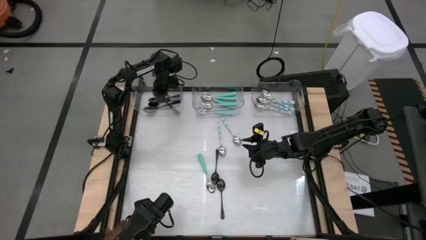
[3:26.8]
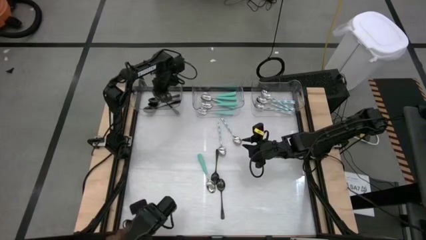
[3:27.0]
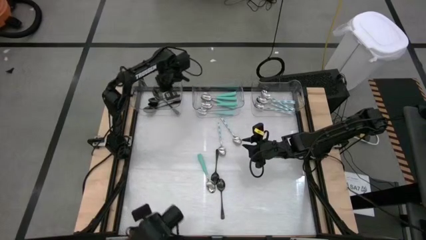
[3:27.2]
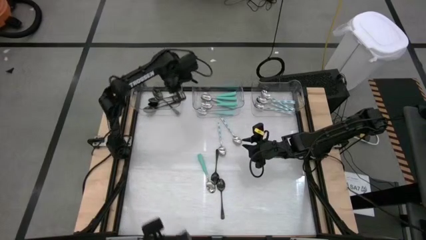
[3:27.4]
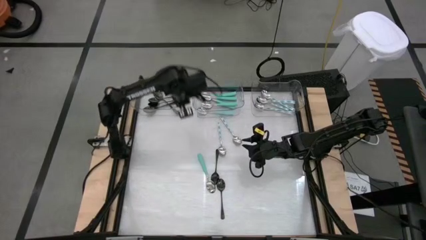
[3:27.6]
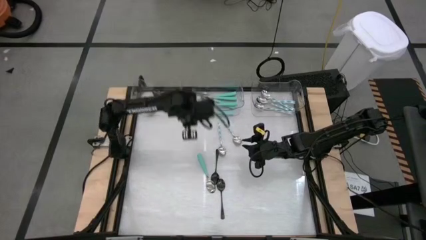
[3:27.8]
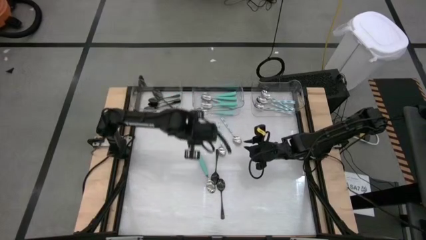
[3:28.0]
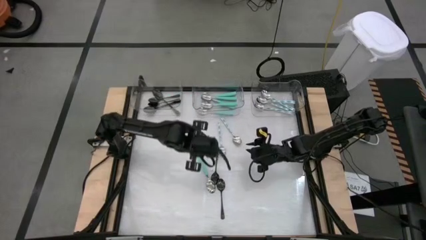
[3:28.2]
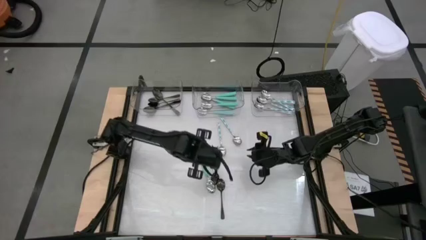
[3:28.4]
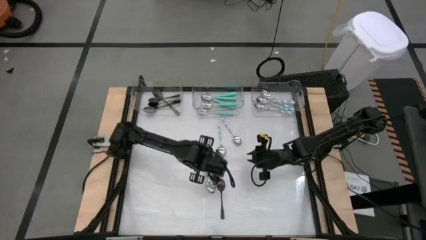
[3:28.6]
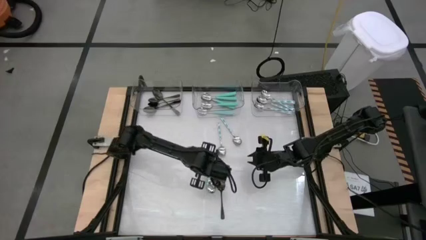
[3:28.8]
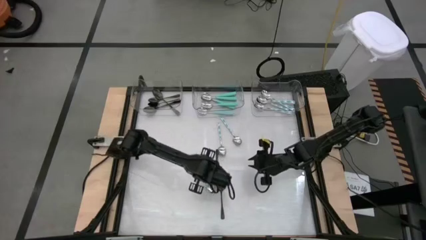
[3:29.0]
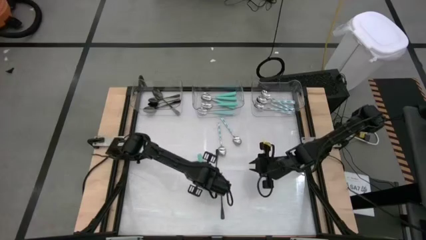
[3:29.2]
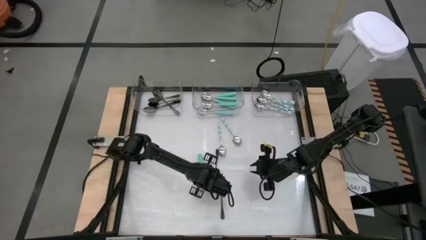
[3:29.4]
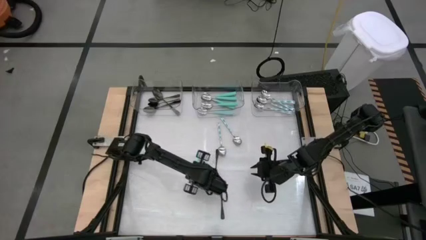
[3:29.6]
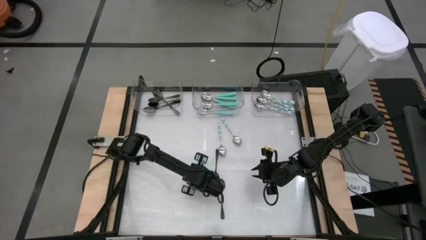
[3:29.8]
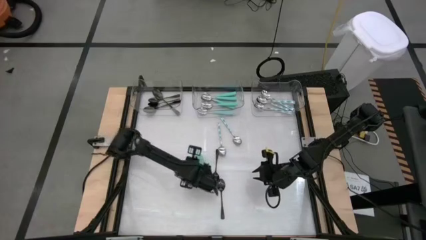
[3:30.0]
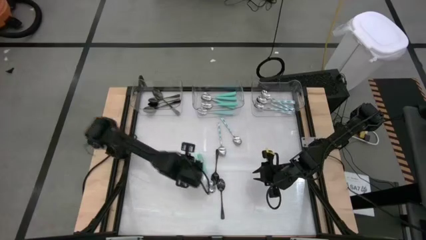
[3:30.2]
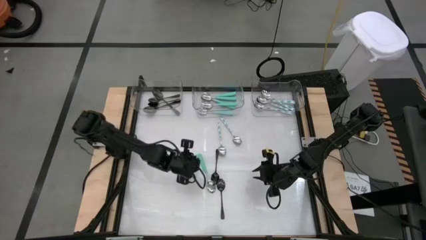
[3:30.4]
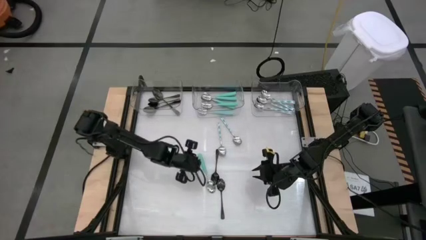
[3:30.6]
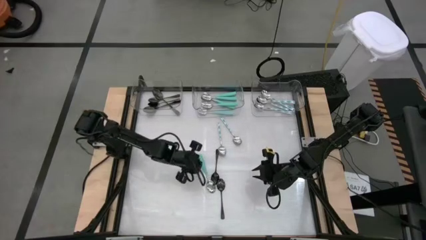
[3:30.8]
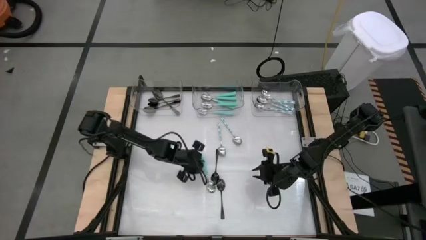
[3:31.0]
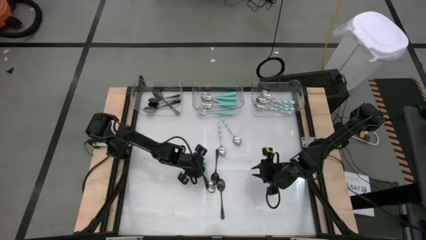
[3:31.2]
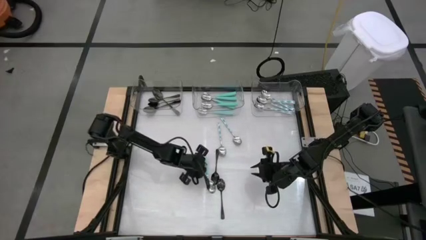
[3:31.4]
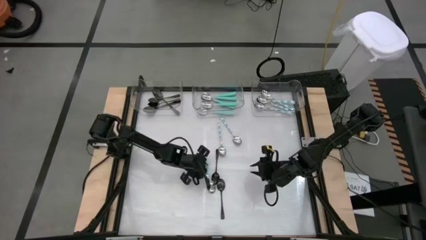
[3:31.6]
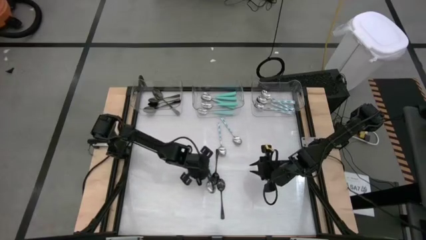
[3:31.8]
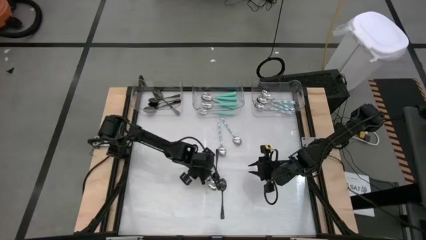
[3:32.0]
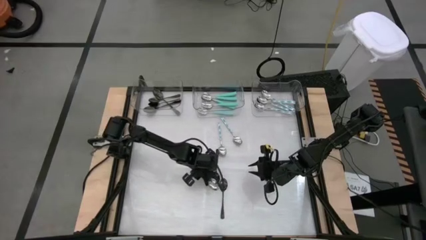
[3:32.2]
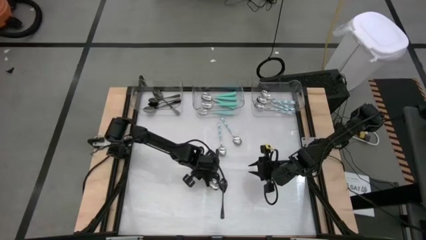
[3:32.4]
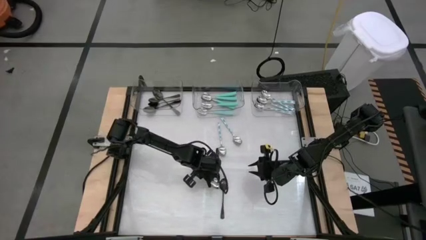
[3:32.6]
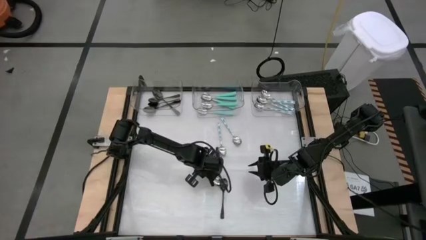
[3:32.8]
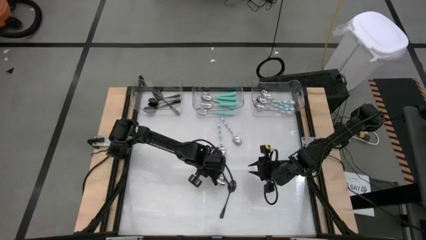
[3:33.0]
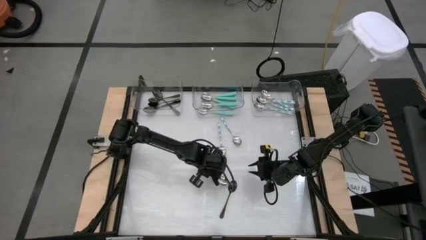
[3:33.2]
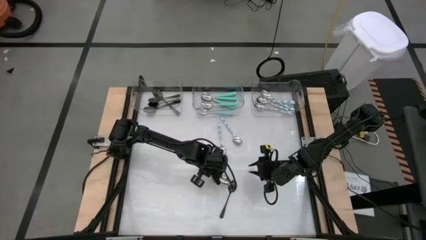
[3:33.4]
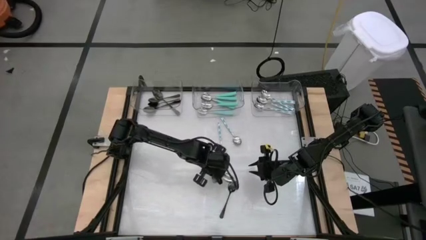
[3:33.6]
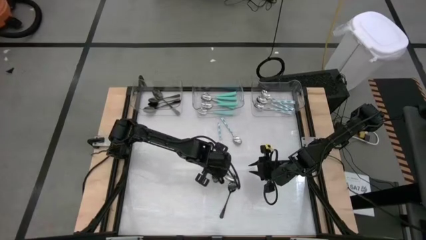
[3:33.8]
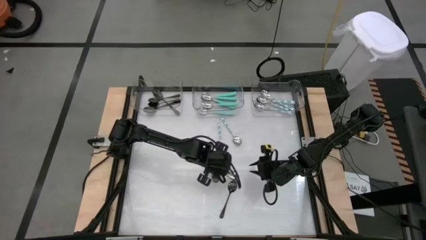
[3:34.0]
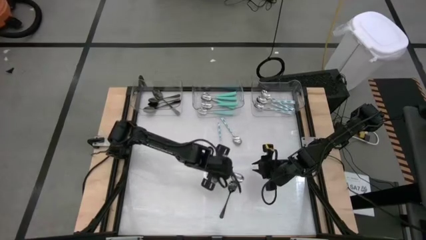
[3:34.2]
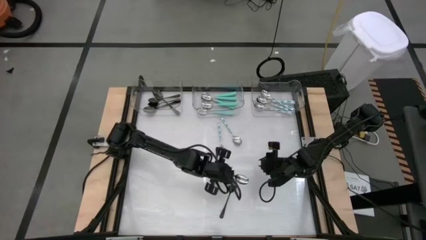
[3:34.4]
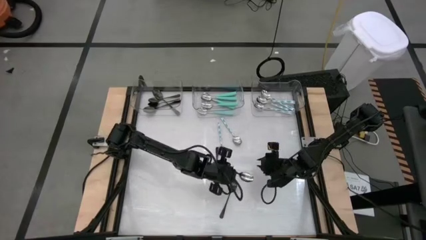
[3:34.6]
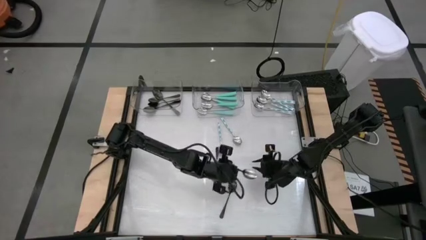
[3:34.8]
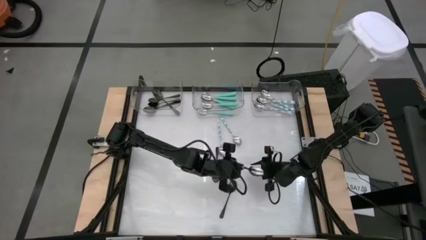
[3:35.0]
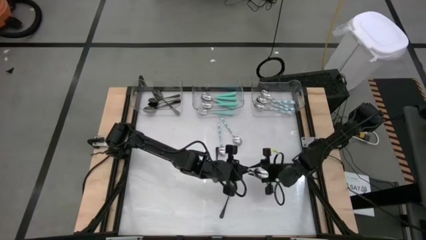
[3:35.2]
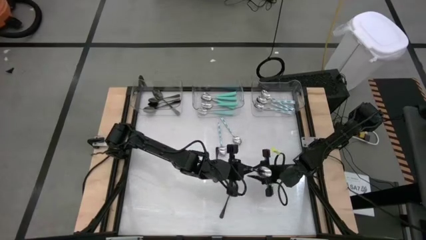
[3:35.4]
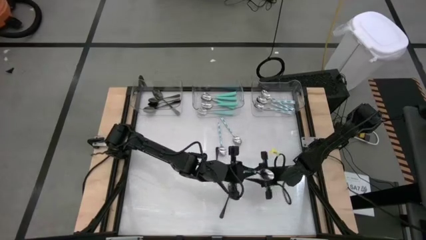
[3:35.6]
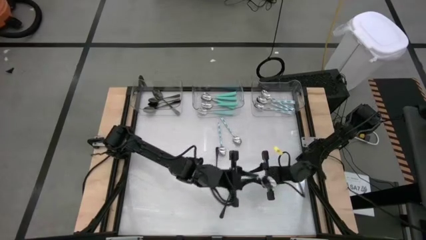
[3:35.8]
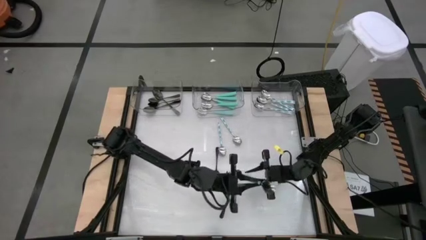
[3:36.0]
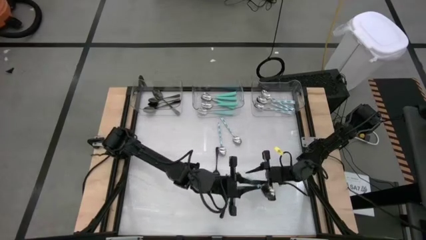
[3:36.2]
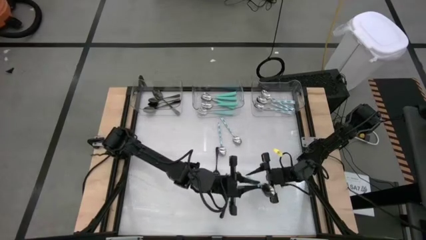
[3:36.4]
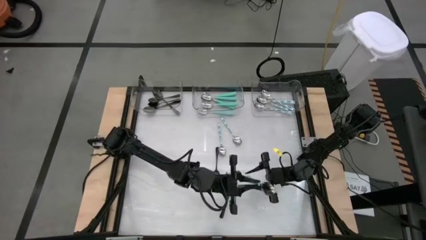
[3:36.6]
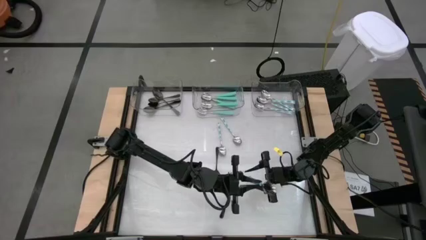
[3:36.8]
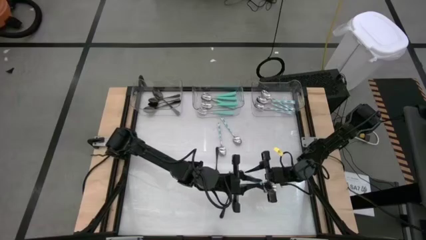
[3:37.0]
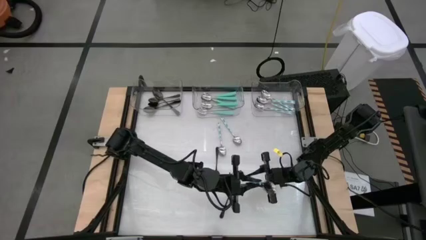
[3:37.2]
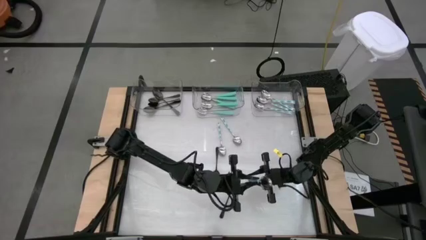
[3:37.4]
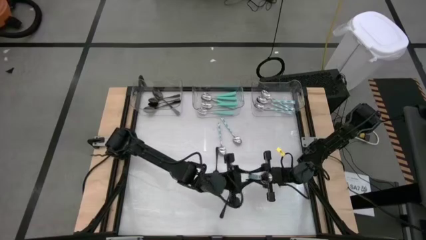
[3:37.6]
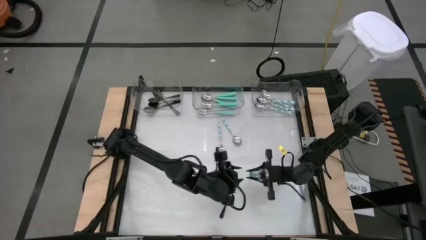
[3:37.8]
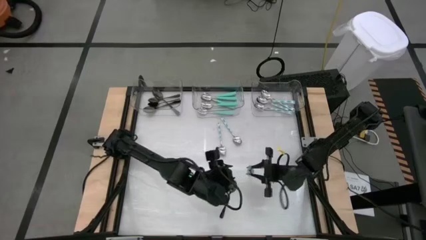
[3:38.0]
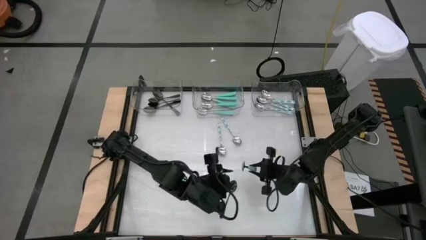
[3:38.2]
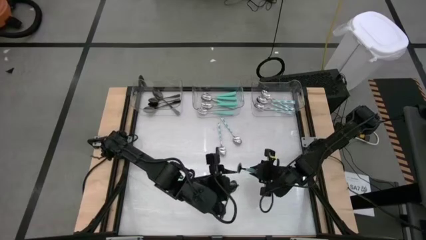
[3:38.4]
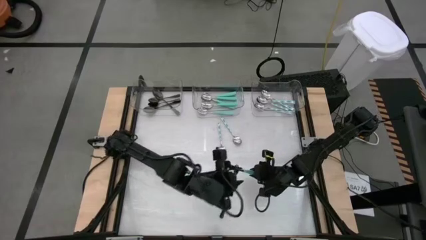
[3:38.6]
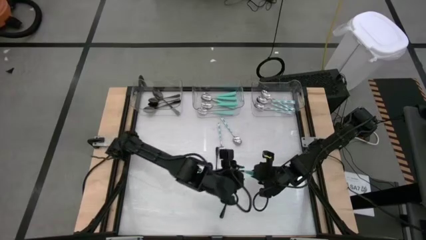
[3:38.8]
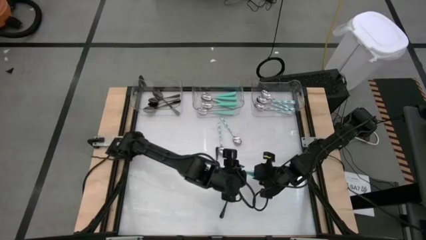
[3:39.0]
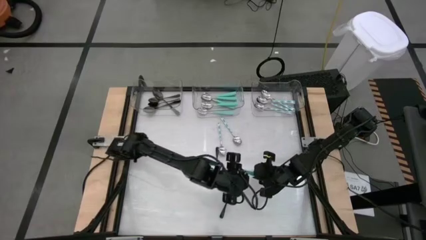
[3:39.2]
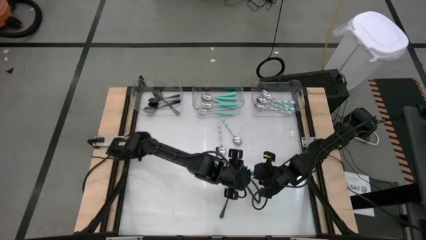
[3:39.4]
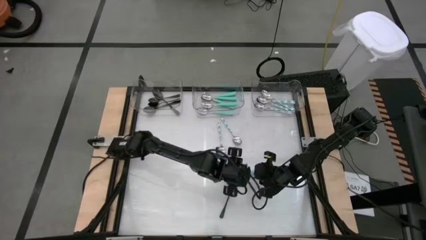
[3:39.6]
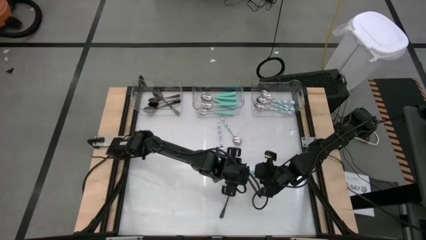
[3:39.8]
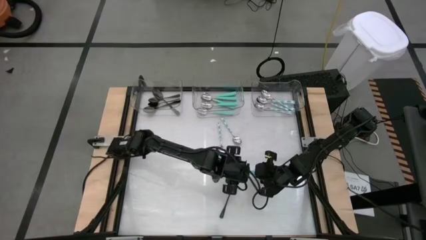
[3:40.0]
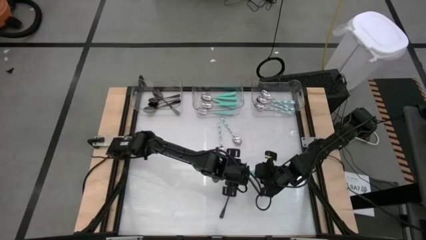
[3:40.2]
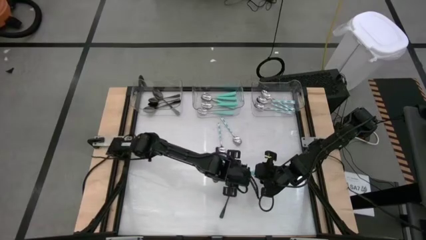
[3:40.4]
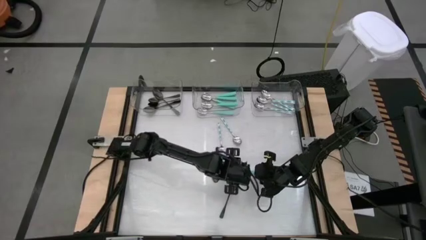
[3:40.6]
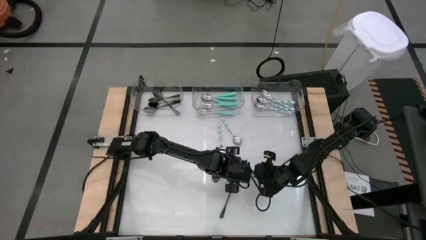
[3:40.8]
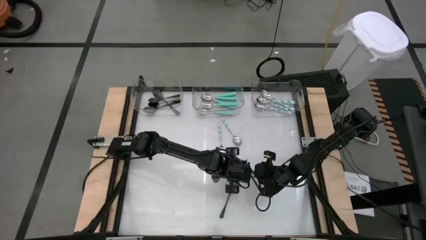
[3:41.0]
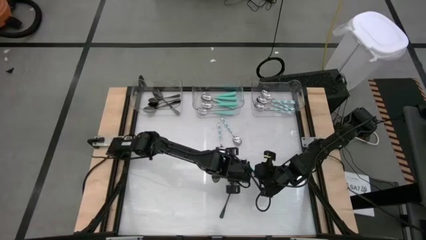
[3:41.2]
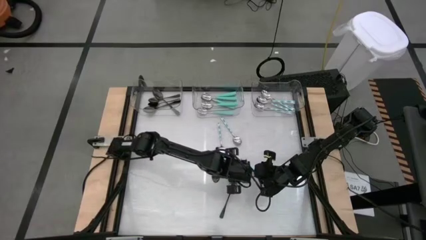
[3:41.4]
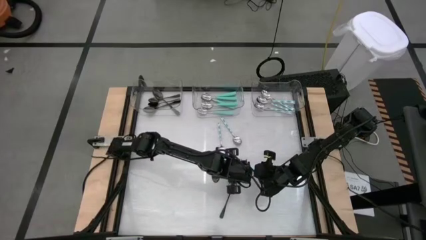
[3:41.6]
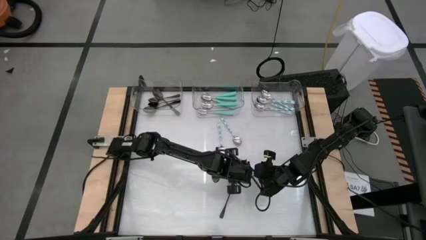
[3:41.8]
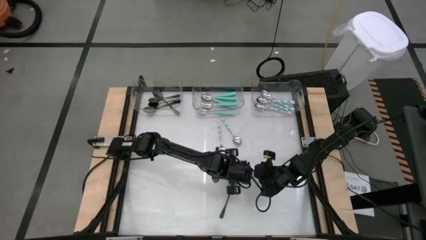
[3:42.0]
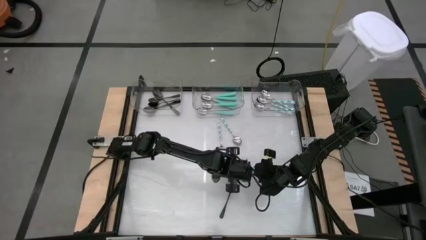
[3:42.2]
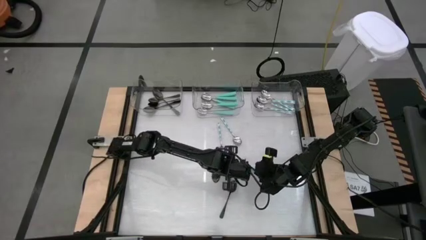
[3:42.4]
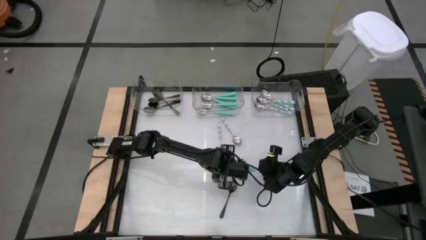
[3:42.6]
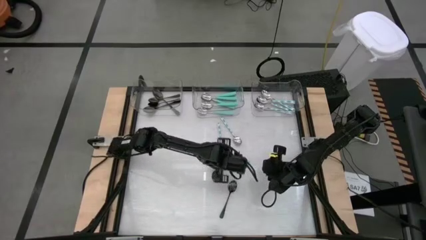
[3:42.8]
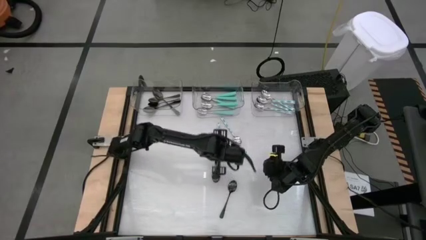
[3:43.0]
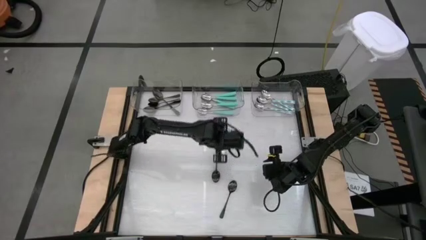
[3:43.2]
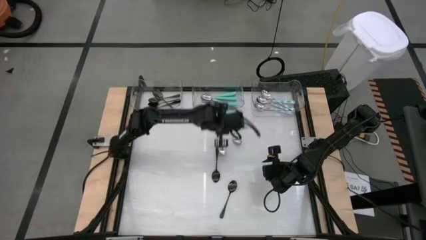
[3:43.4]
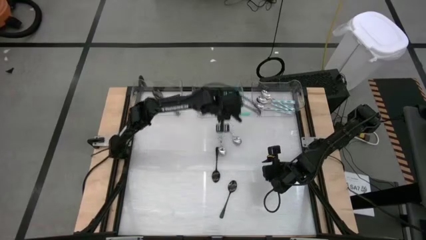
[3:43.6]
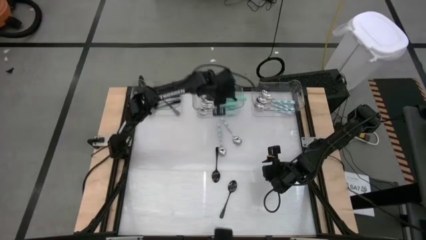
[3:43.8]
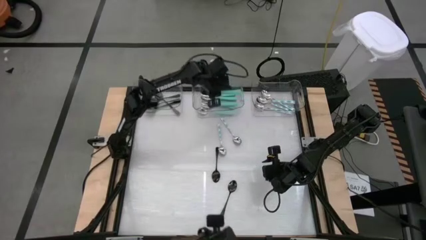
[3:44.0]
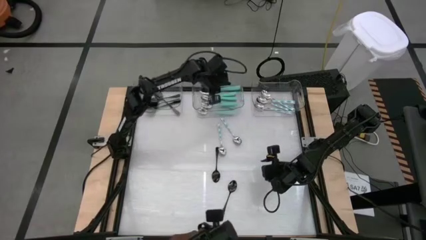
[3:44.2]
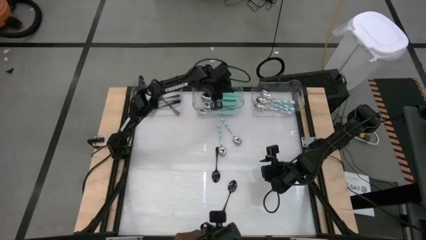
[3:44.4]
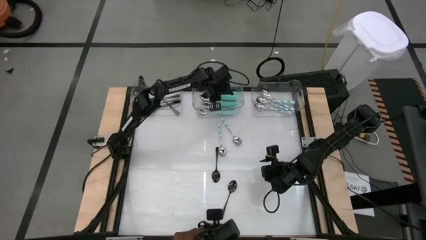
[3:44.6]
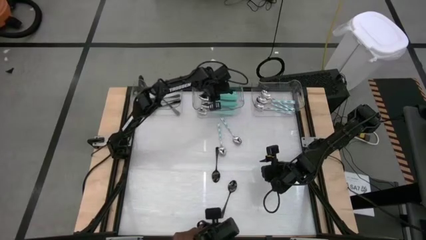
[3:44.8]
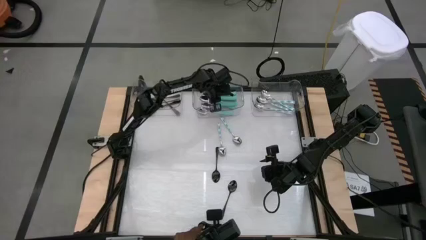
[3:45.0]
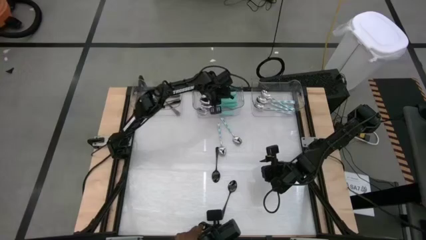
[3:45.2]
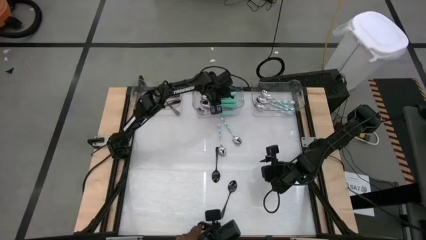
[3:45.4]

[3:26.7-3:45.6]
Task: Sort silverware by color (type)
Put the green spoon into the center transparent bin
